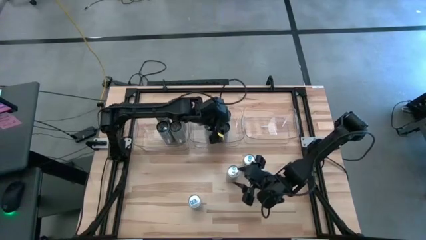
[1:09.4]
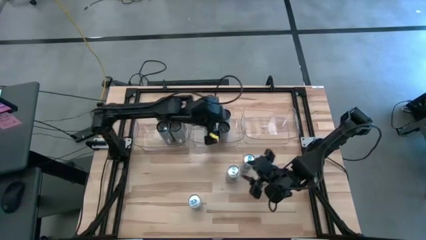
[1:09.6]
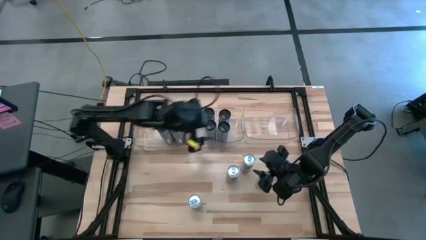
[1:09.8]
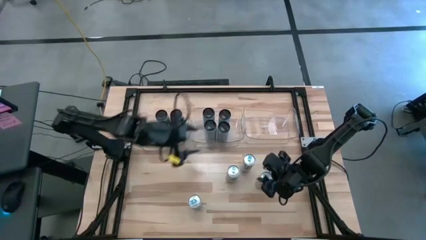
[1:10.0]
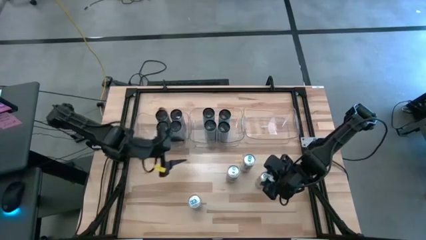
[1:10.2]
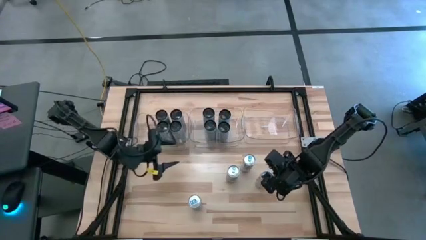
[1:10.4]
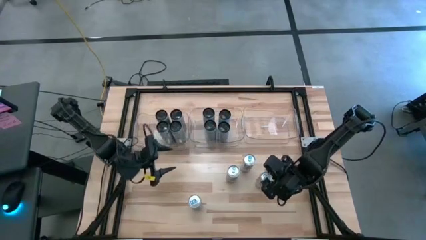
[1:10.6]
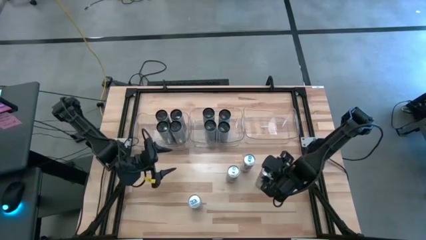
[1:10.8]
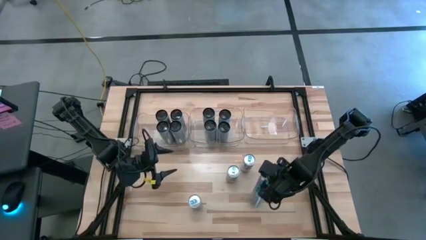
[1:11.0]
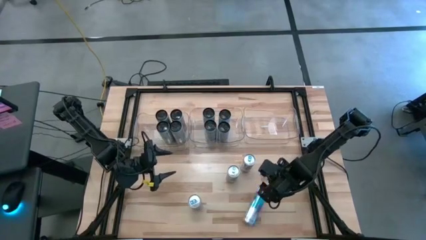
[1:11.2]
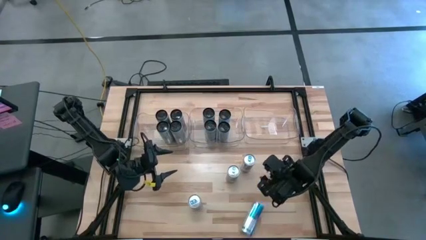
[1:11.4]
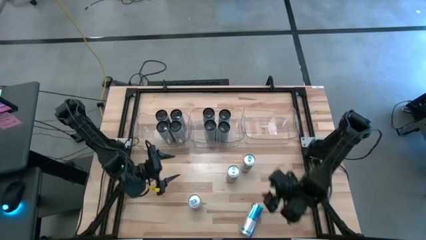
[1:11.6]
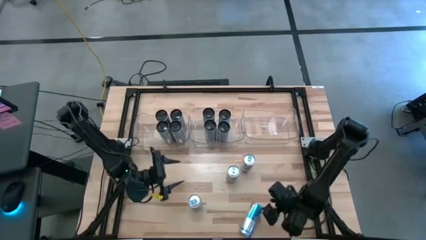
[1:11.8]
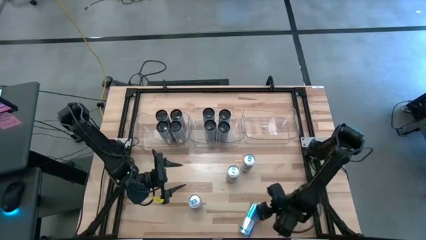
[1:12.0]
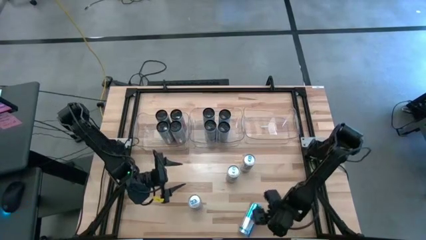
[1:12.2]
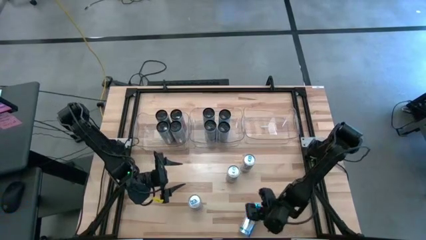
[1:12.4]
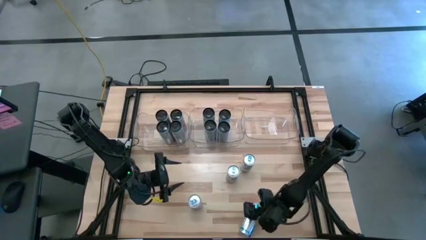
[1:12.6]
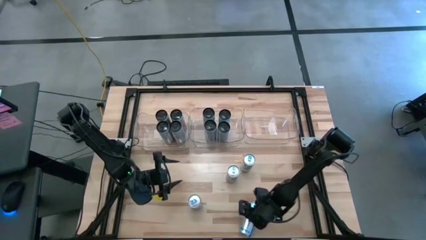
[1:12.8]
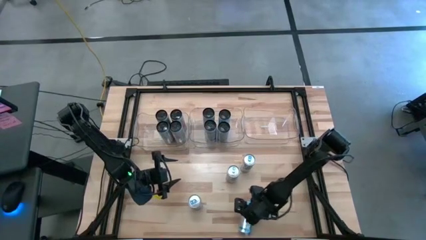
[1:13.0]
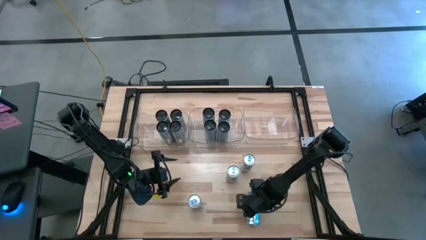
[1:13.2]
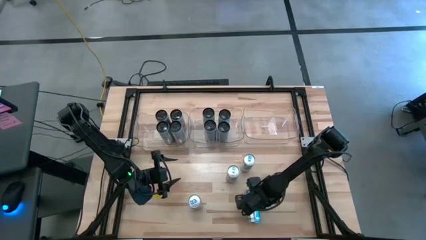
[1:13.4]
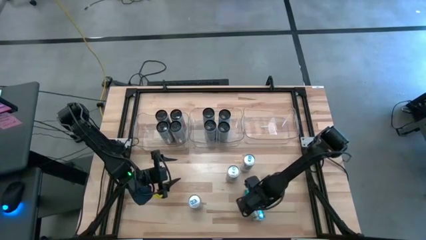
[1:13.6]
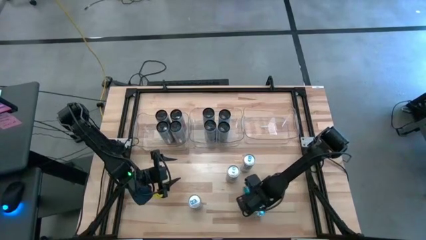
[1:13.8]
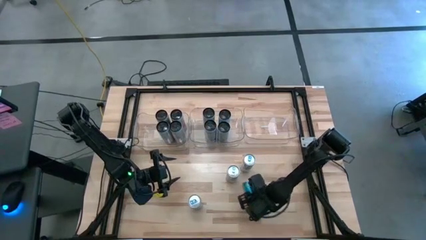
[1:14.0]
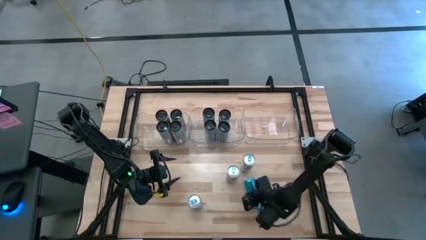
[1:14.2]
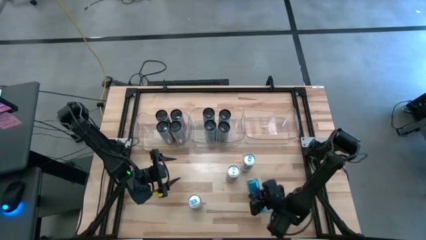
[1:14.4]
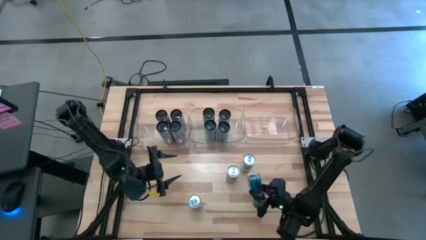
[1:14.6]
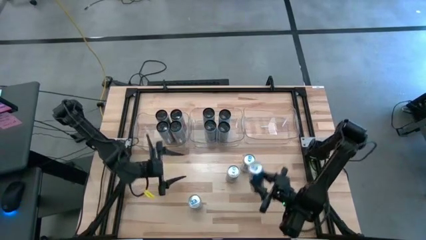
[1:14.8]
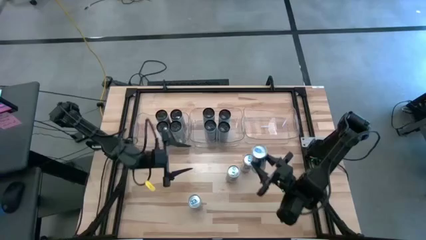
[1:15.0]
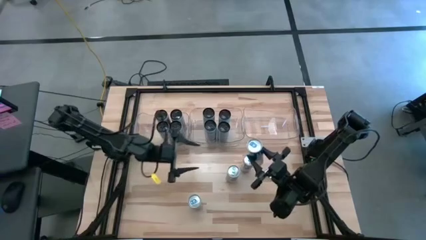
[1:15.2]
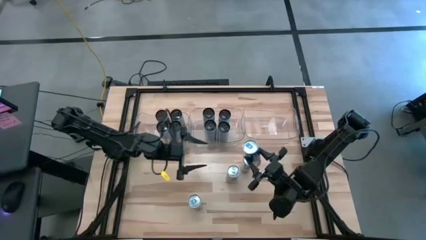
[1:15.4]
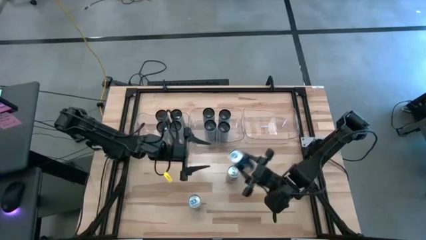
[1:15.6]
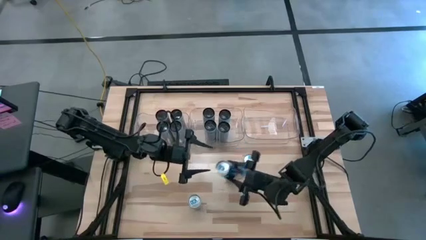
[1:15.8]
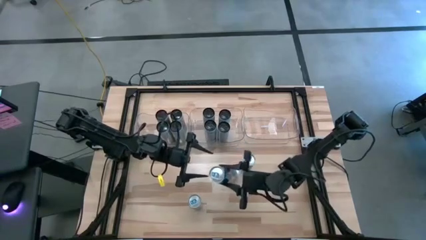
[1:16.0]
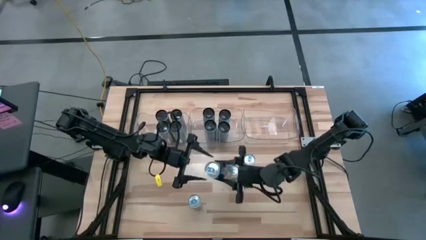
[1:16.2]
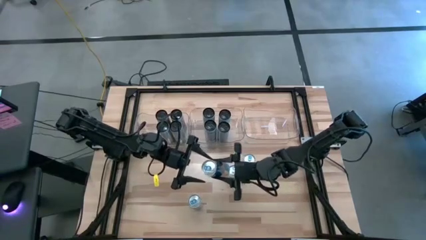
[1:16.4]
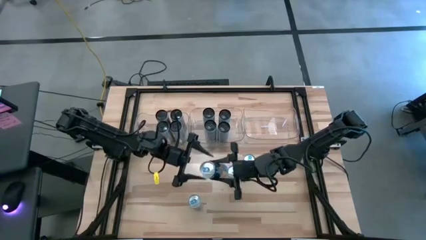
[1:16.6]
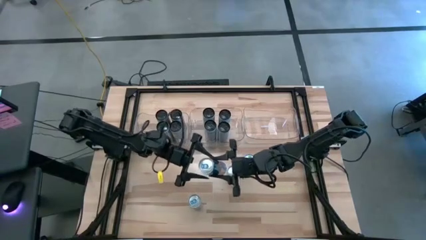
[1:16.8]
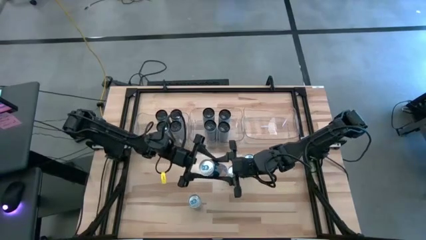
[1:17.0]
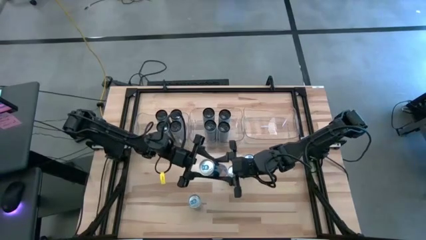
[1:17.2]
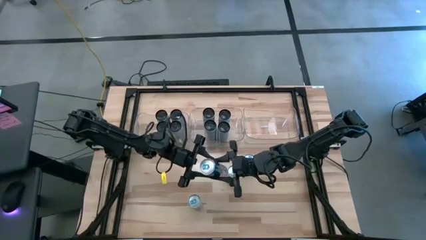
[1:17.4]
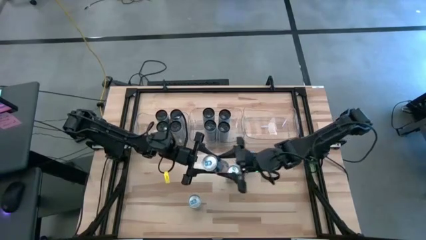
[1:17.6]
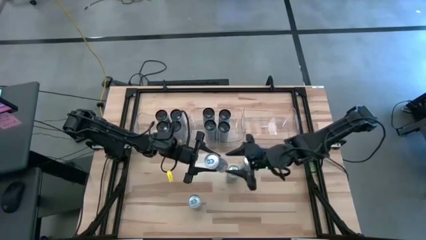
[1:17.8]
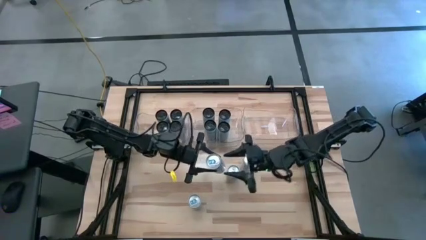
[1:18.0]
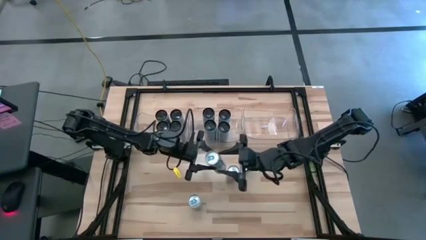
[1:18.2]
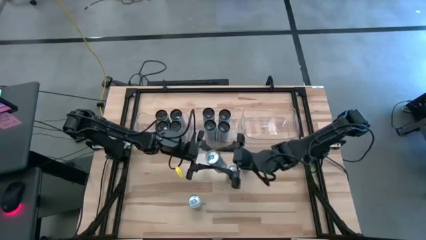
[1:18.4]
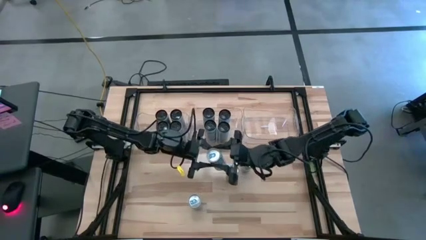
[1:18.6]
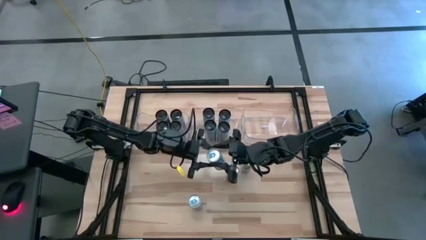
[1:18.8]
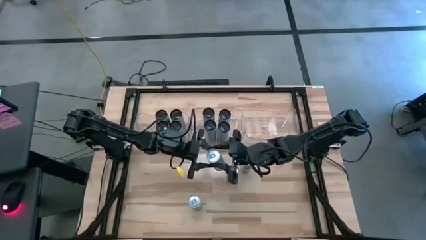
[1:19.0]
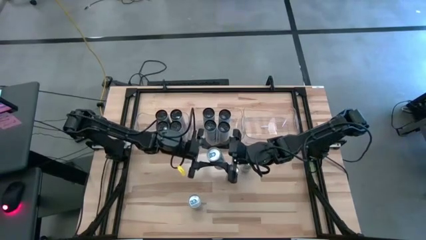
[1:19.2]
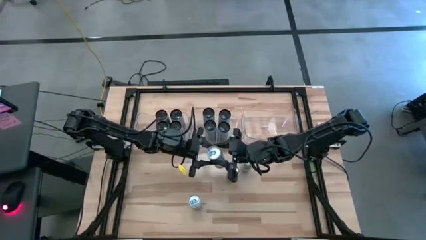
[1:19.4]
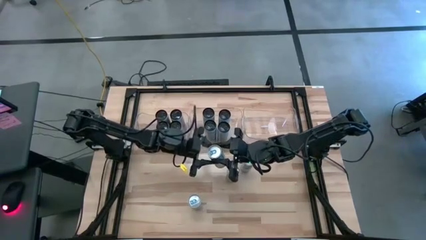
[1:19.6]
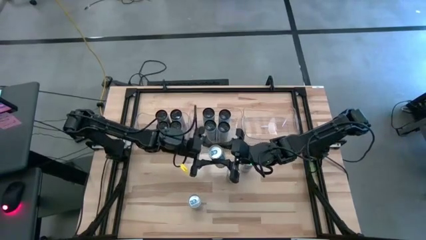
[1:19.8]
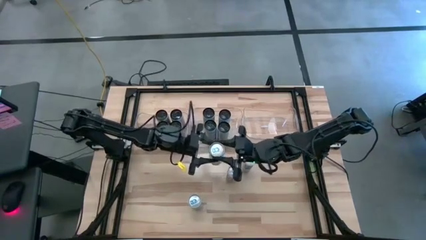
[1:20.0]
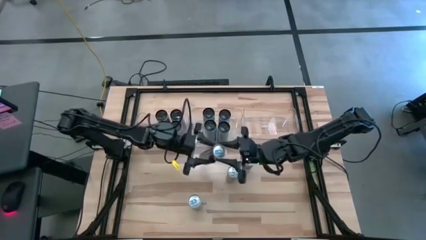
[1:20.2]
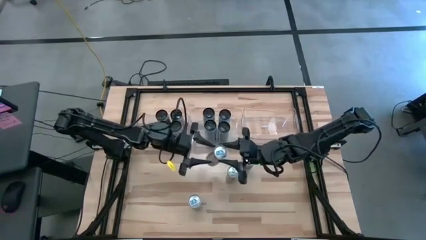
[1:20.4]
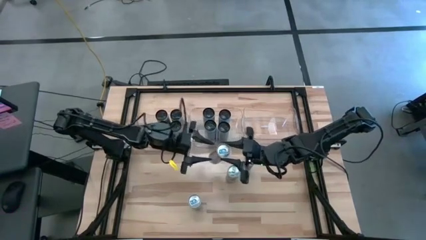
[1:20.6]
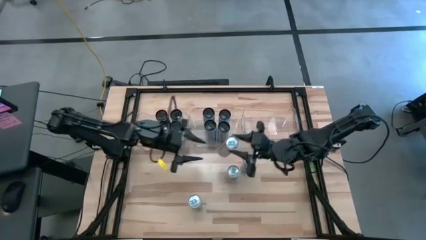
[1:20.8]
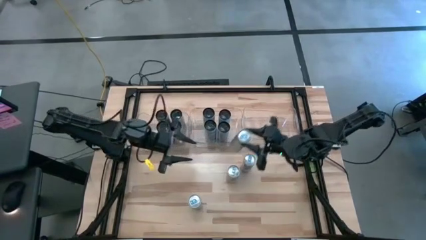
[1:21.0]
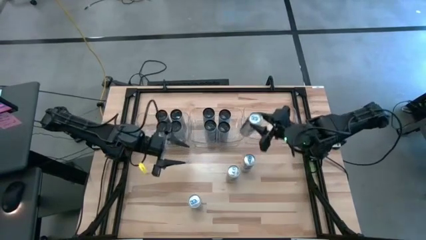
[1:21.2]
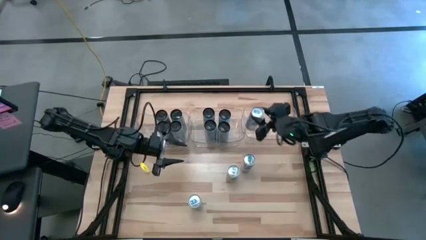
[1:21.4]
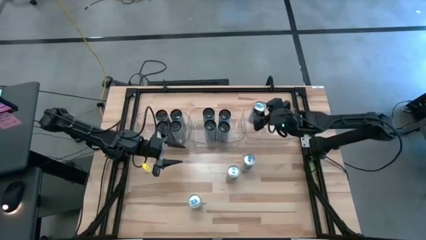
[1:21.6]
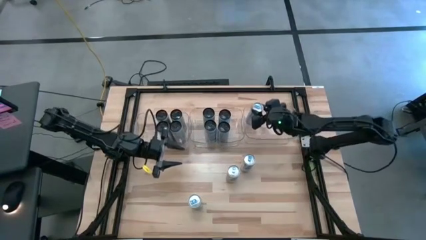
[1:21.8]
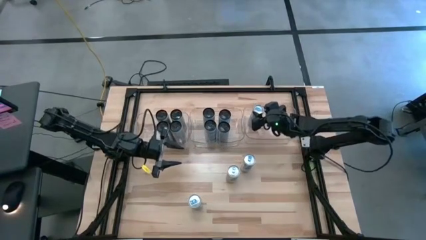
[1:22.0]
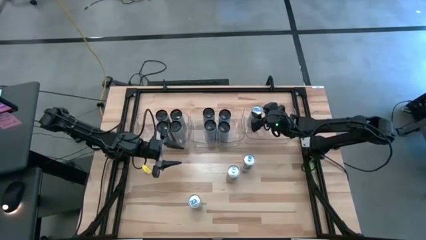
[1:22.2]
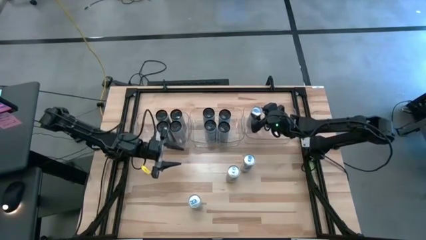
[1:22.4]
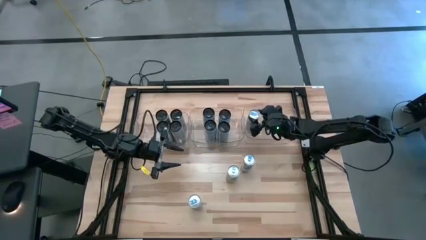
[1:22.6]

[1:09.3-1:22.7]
Task: Sort soda cans
Put the silver soda can into the right transparent bin

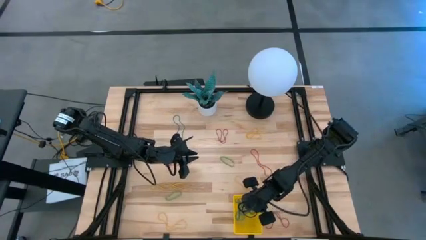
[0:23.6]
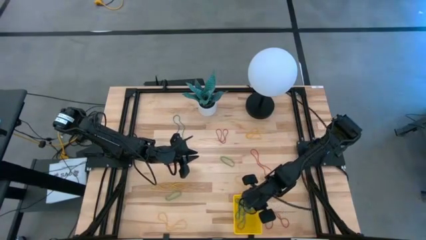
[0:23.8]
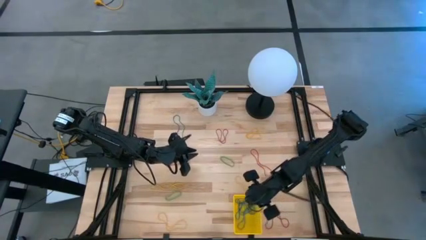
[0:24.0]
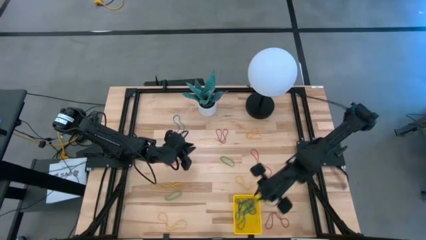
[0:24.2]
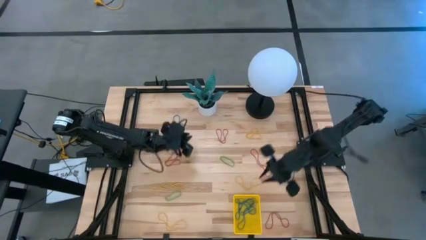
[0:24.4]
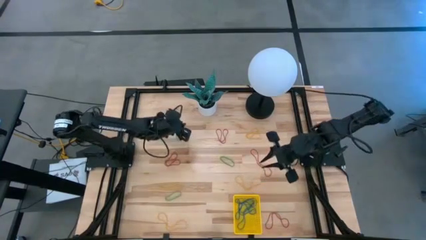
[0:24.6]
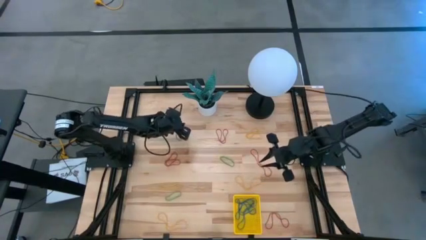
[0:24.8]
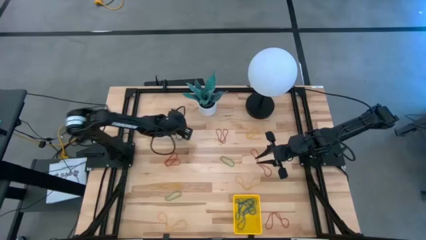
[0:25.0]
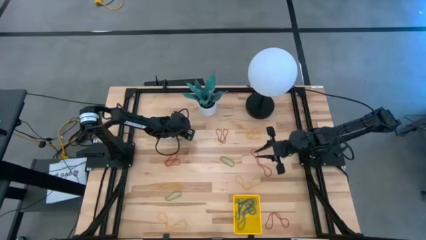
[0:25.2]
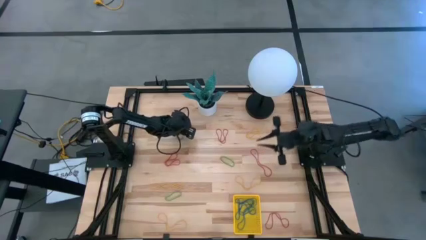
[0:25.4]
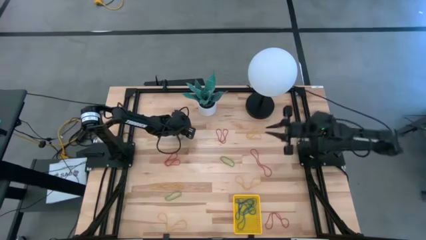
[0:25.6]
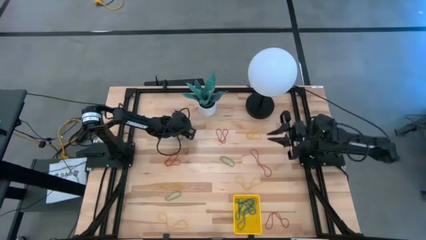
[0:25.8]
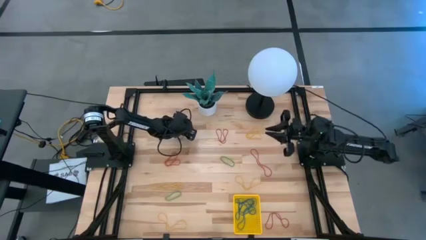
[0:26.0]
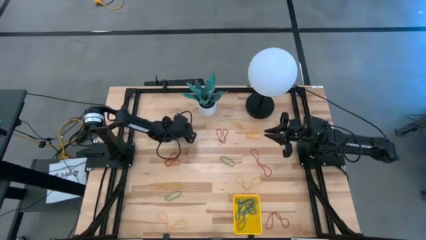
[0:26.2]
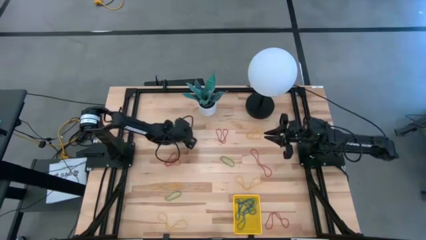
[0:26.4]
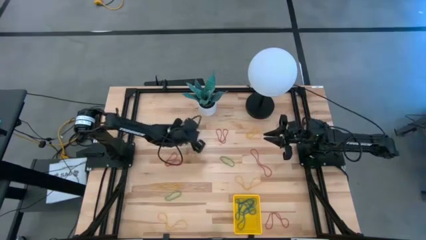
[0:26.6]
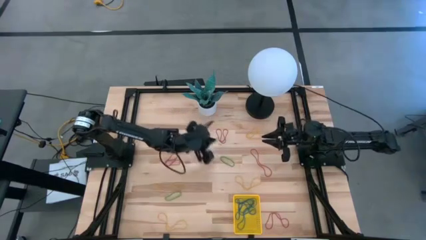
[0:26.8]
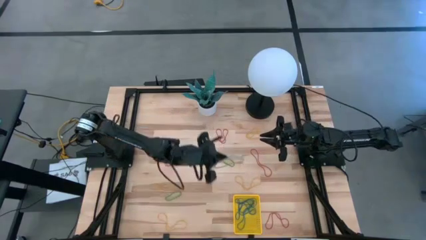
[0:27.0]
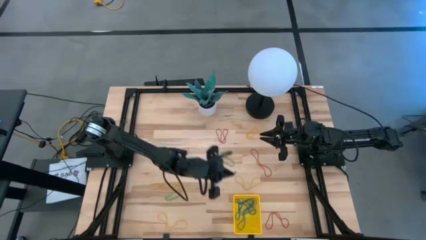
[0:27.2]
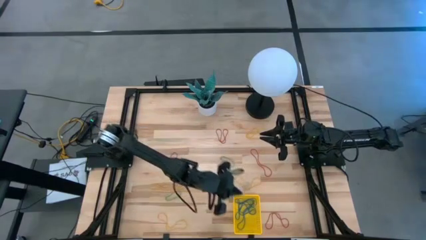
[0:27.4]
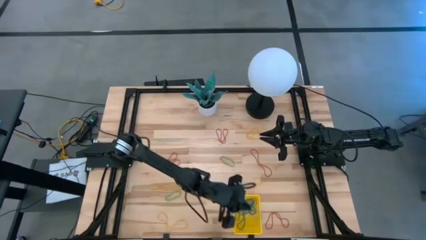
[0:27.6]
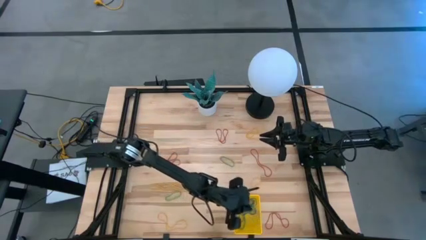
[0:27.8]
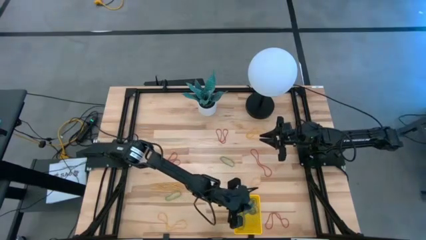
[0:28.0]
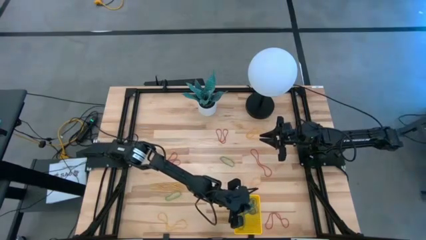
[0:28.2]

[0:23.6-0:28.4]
Task: Pick and place rubber bands into bin
Put the blue rubber band into the yellow basket
